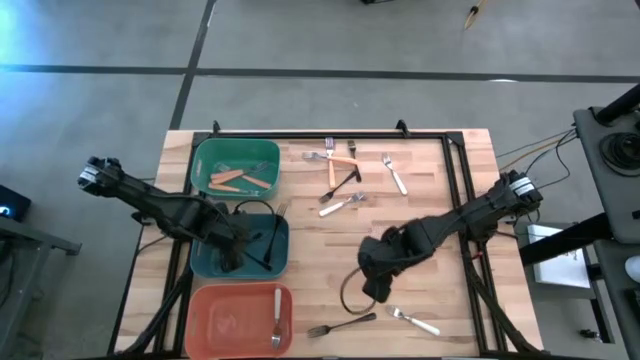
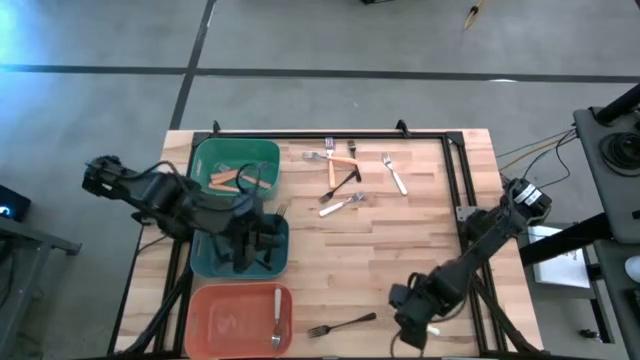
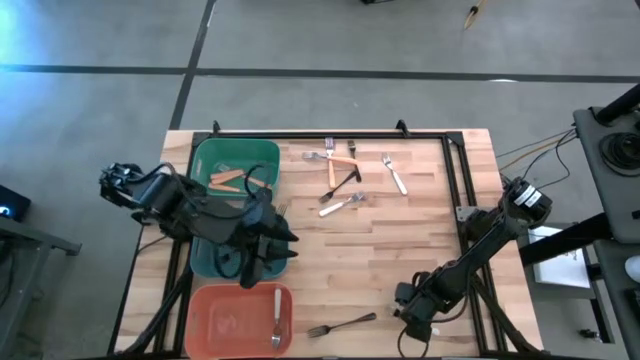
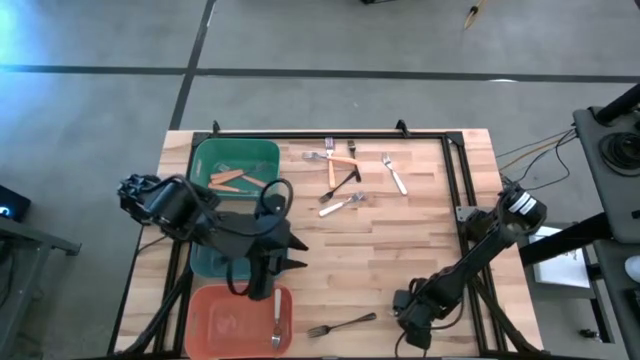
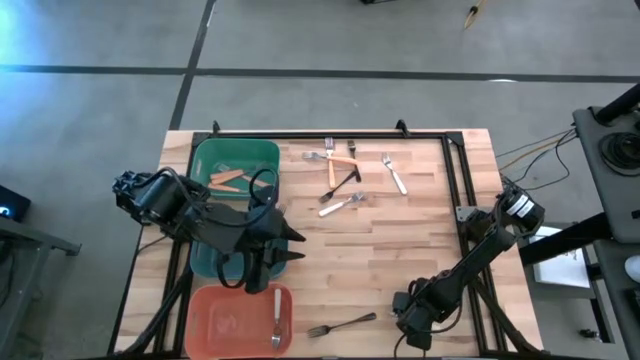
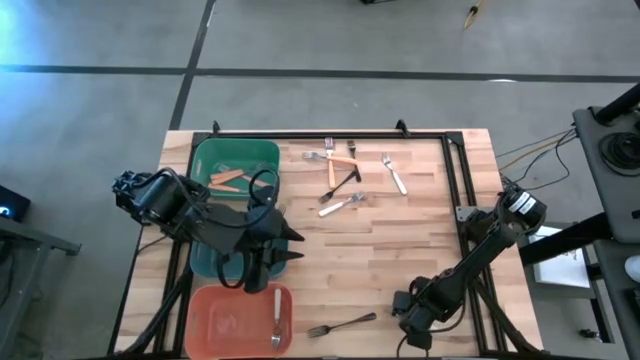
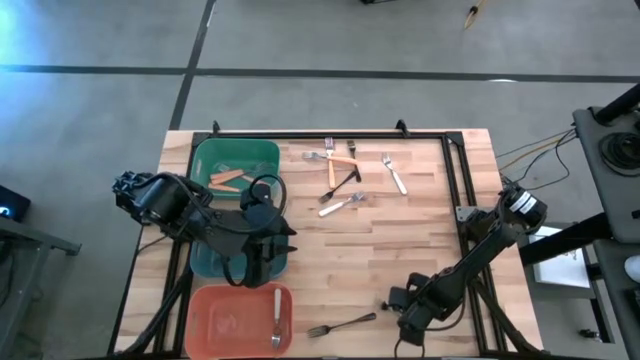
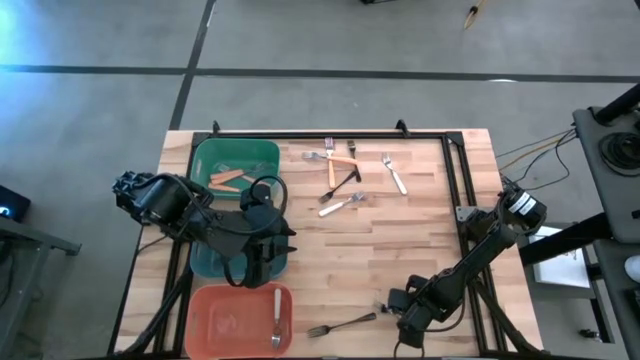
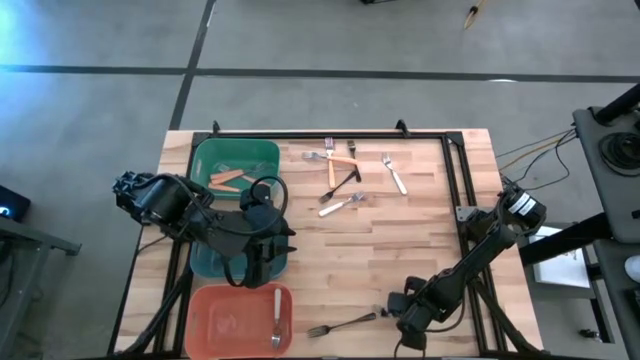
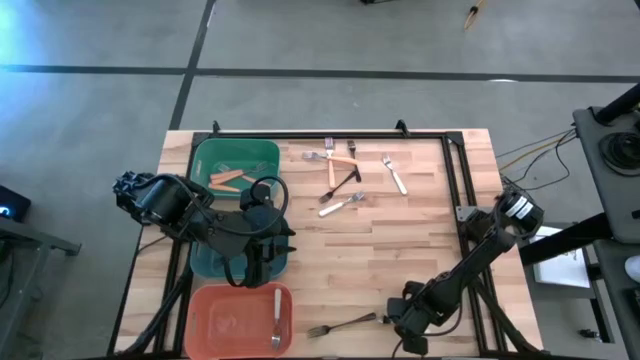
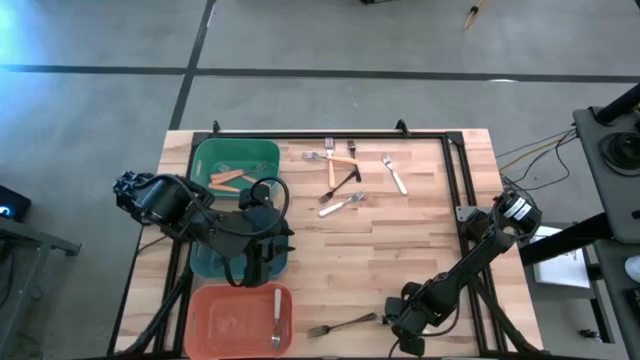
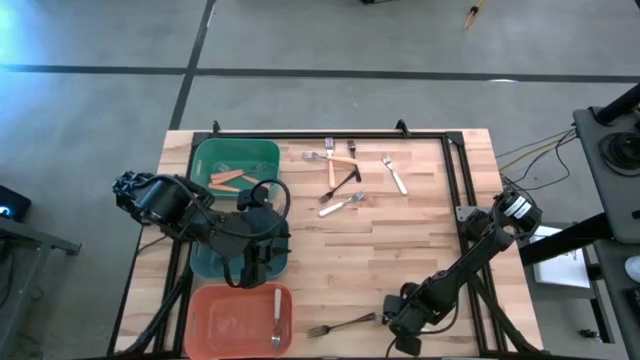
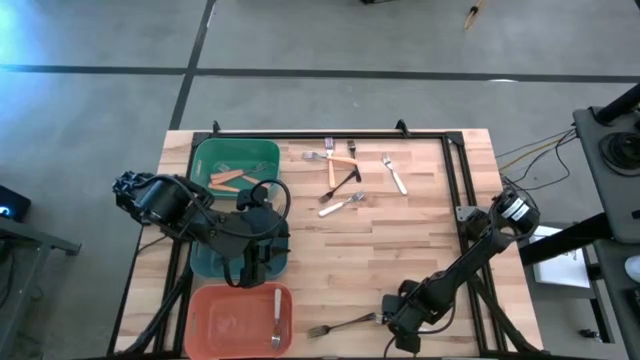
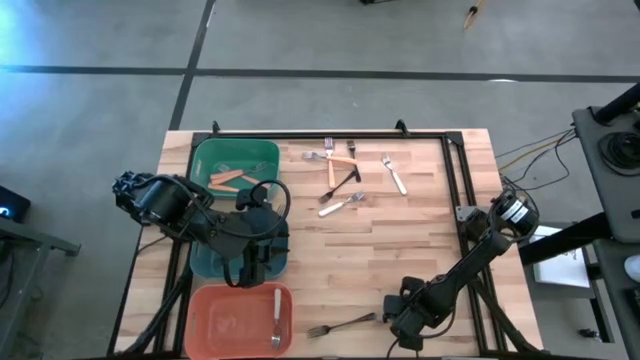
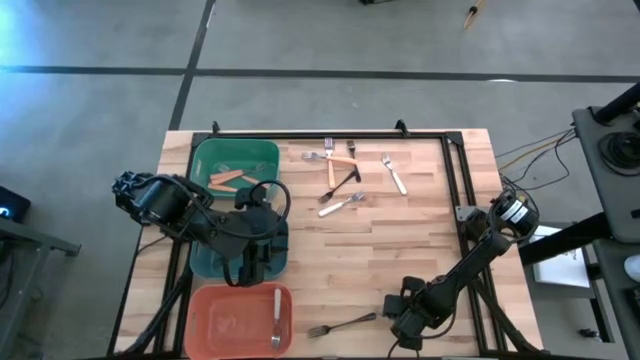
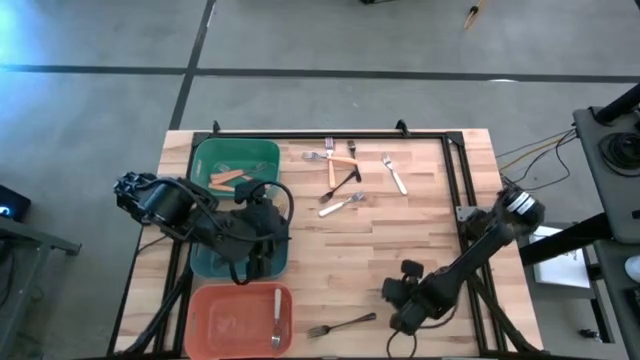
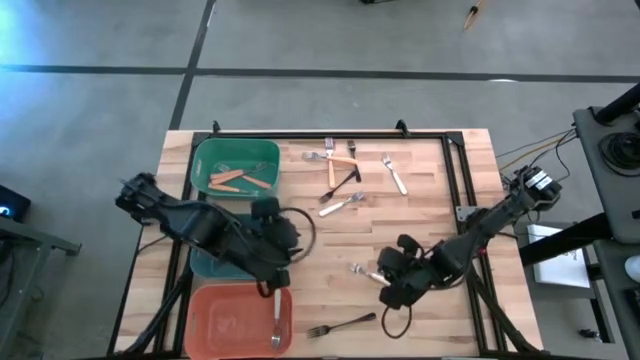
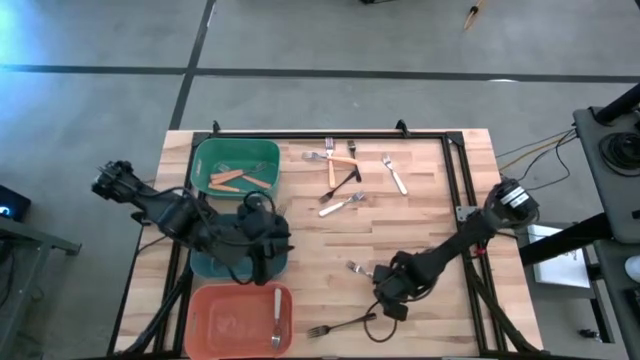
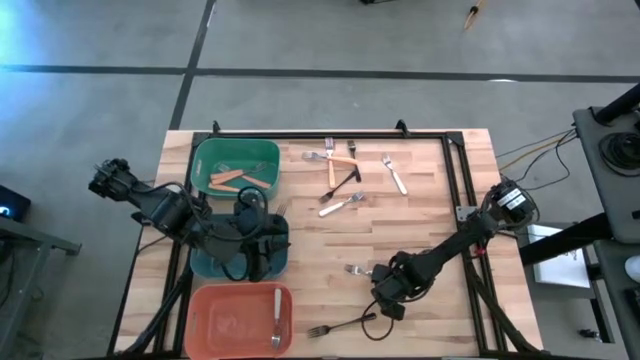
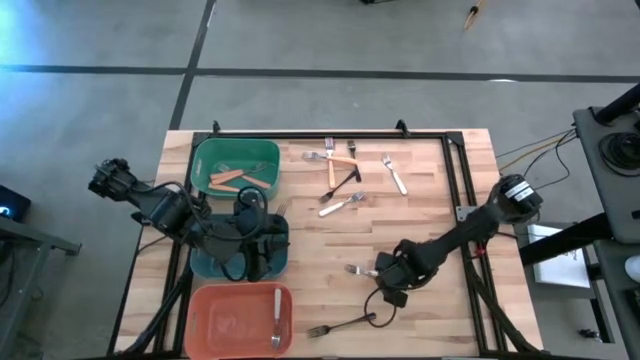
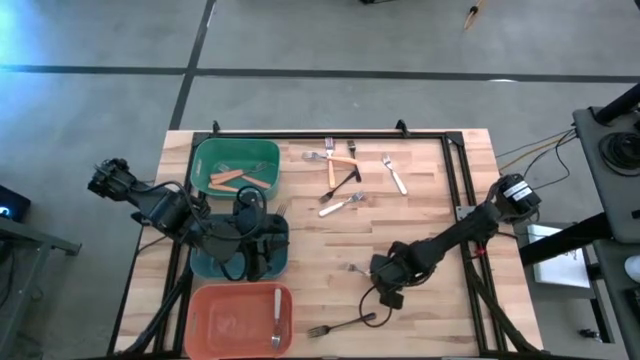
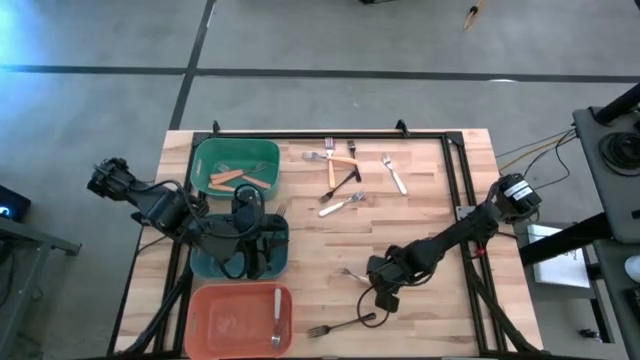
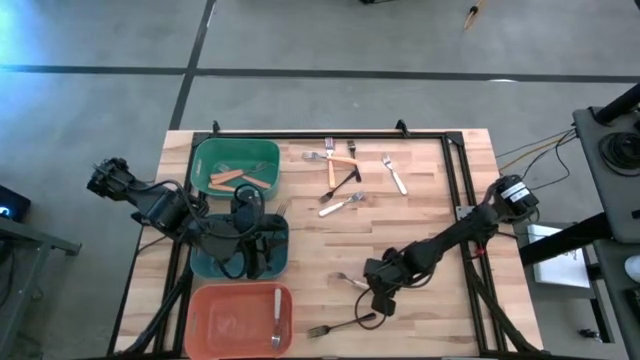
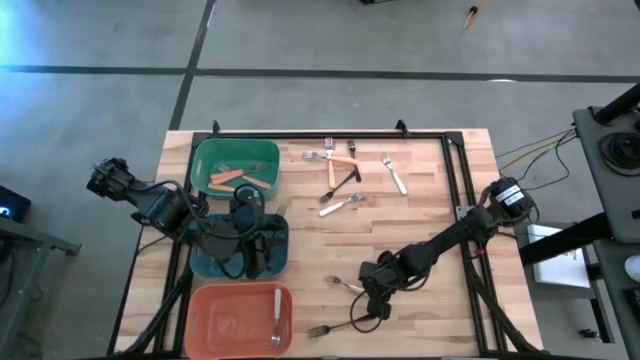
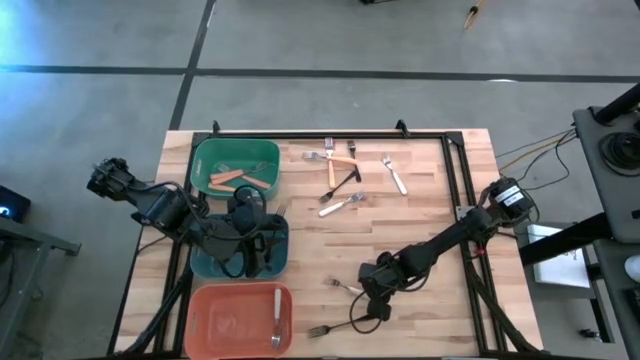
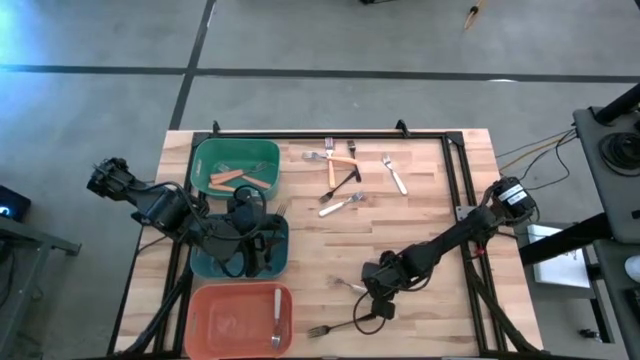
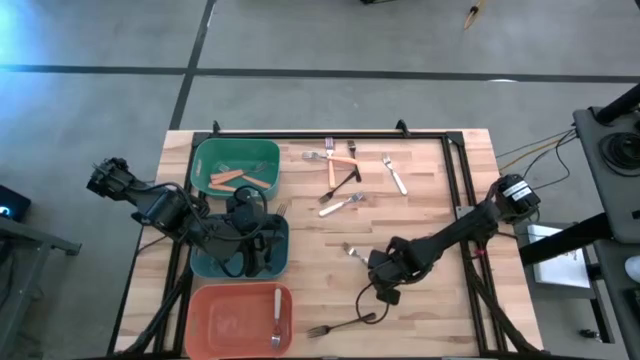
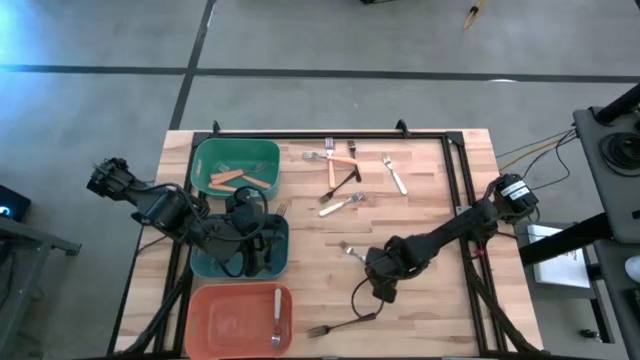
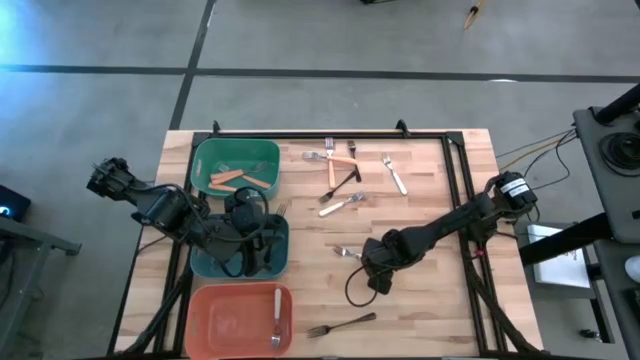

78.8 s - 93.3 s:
Task: Sort silverware by color (type)
Put the white fork into the orange bin

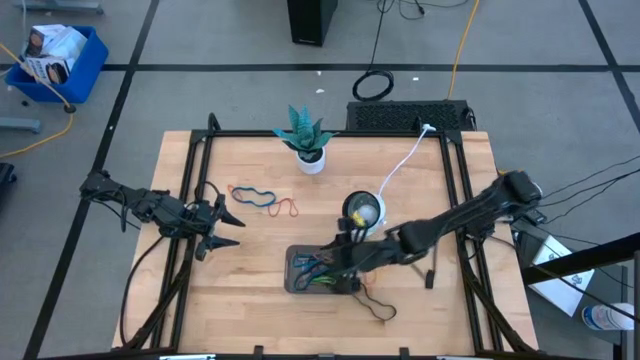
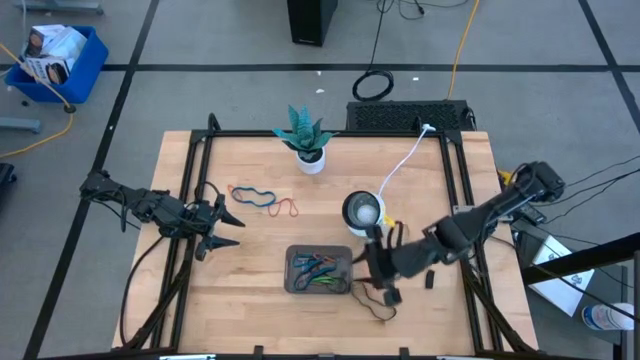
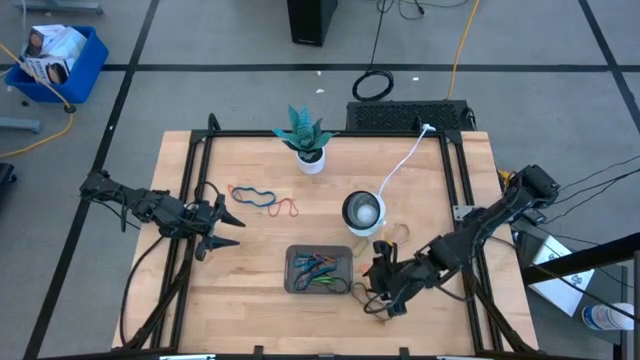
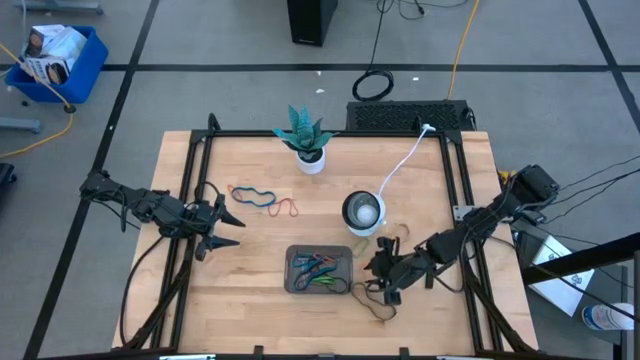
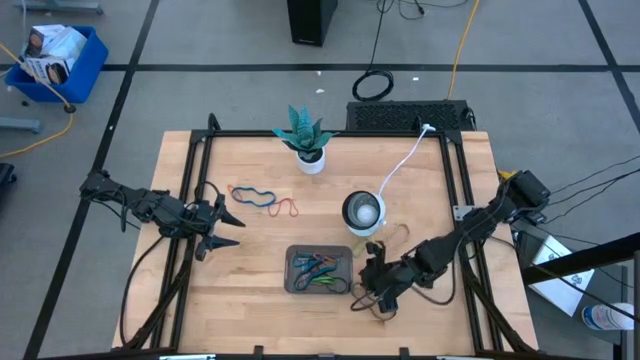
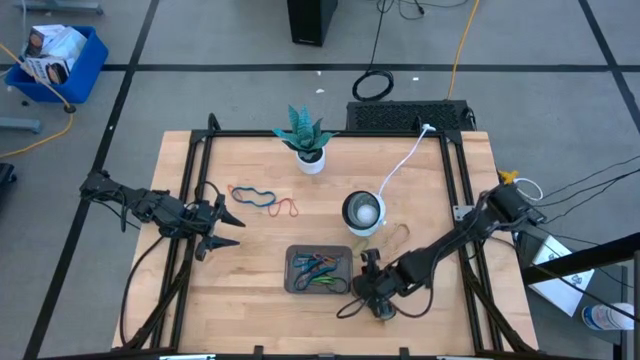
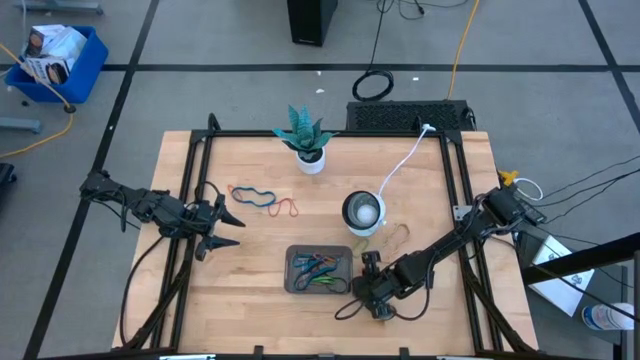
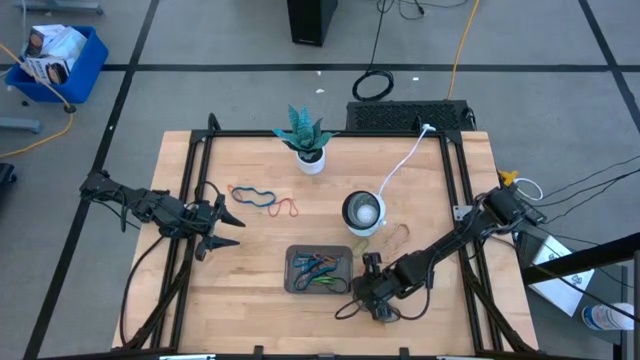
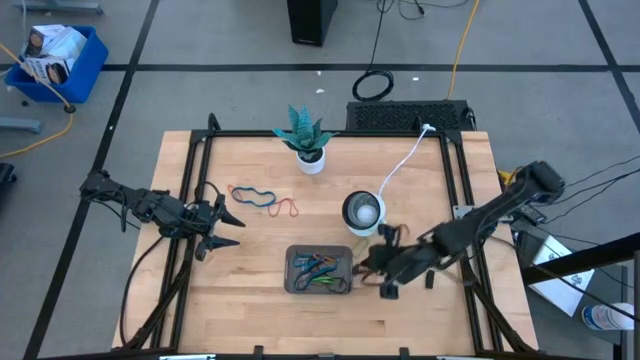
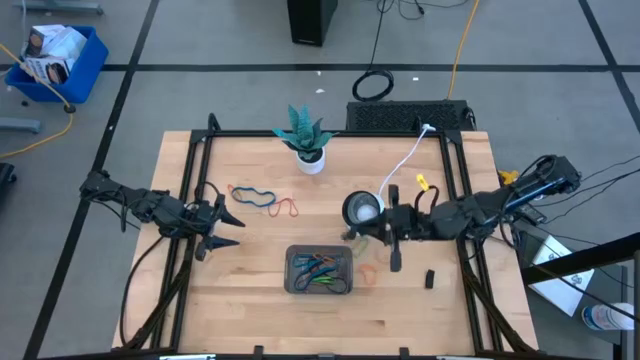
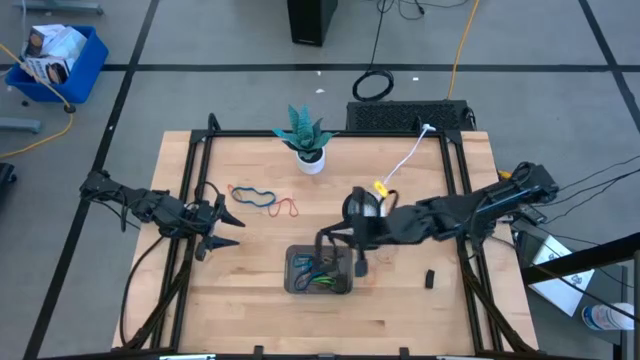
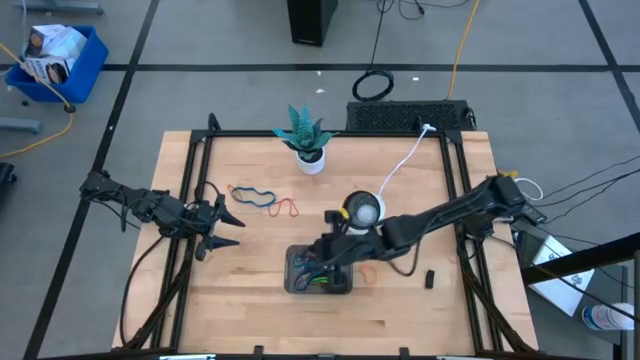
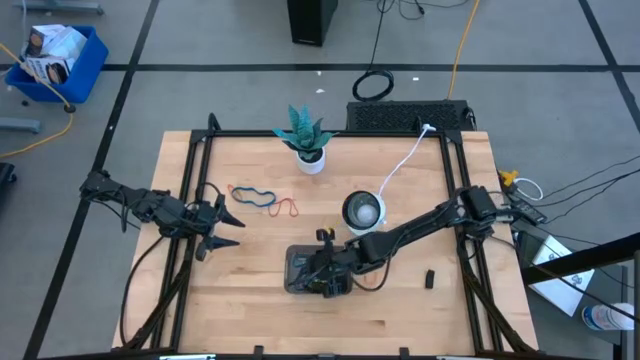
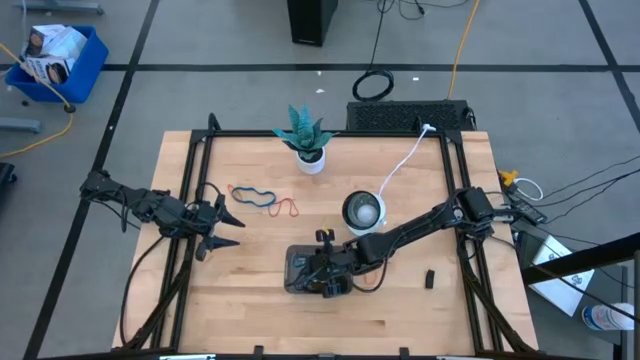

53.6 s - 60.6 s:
Task: Pick and place rubber bands into bin
Put the left black rubber band into the gray bin
